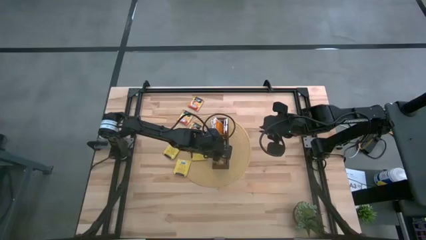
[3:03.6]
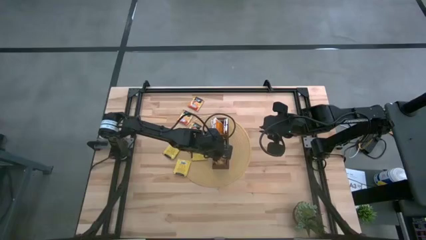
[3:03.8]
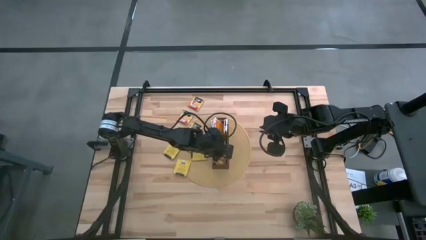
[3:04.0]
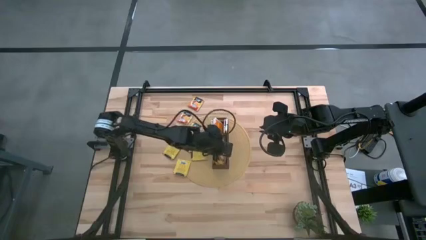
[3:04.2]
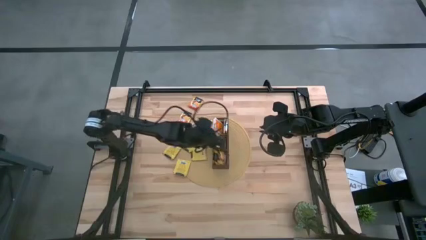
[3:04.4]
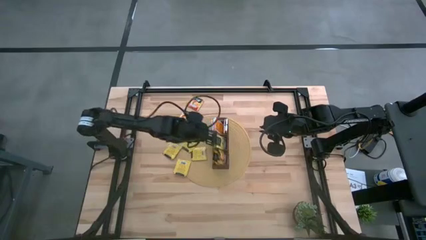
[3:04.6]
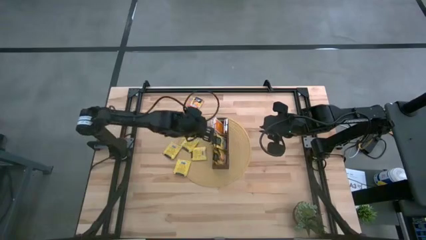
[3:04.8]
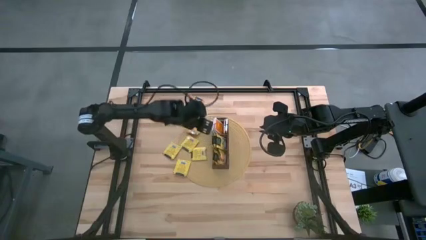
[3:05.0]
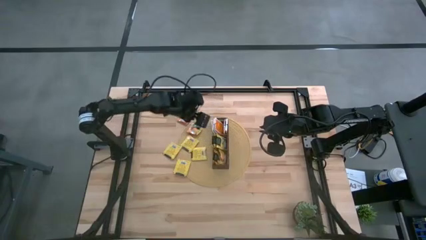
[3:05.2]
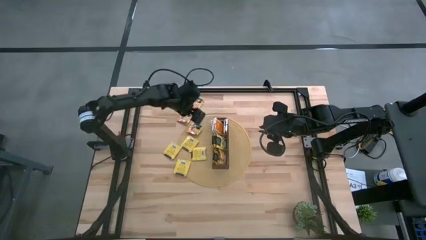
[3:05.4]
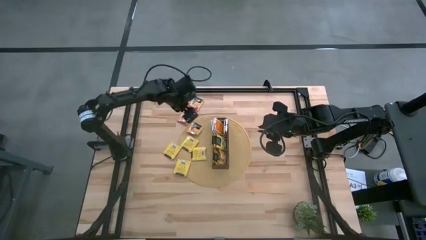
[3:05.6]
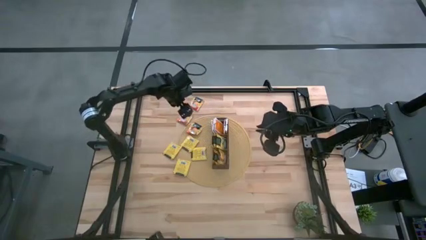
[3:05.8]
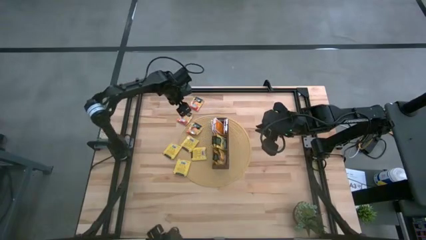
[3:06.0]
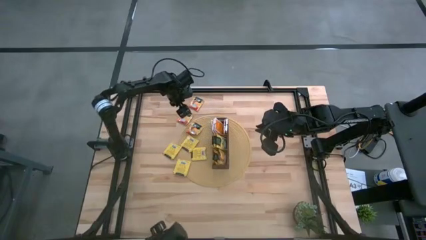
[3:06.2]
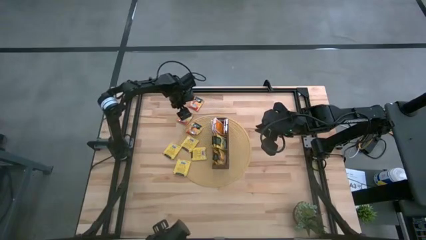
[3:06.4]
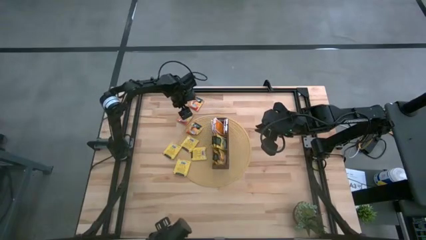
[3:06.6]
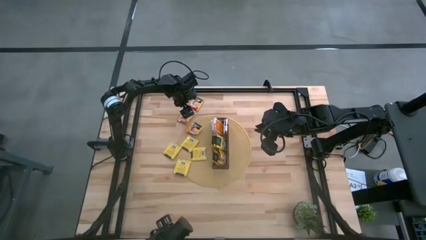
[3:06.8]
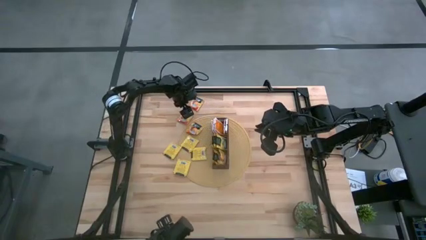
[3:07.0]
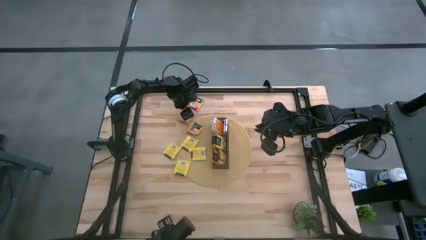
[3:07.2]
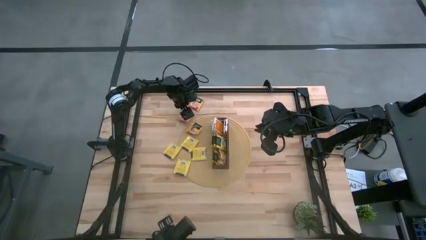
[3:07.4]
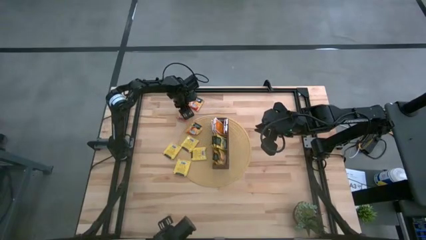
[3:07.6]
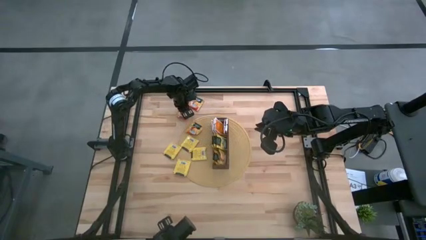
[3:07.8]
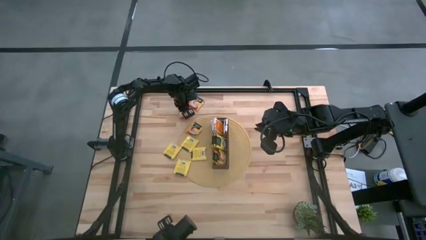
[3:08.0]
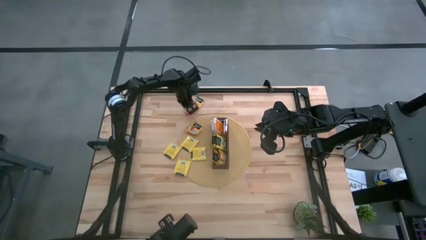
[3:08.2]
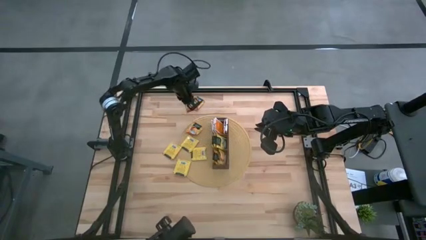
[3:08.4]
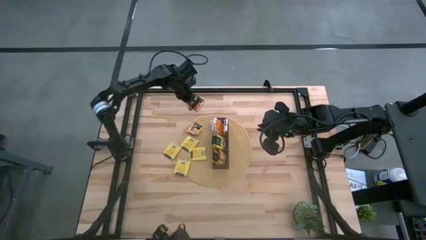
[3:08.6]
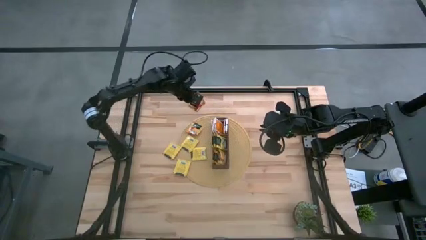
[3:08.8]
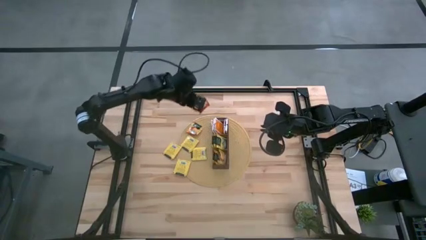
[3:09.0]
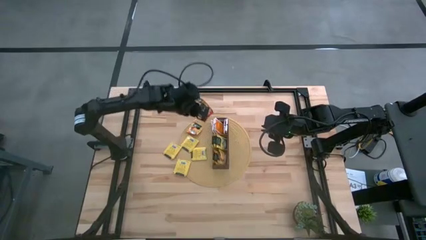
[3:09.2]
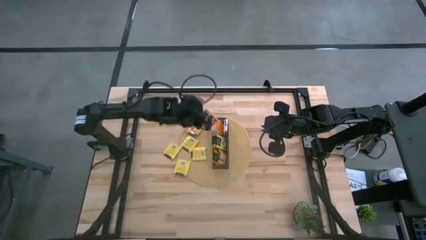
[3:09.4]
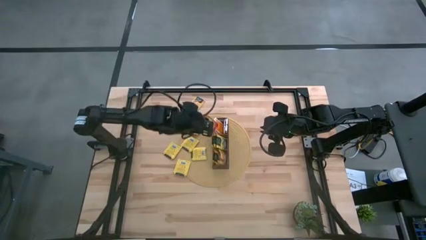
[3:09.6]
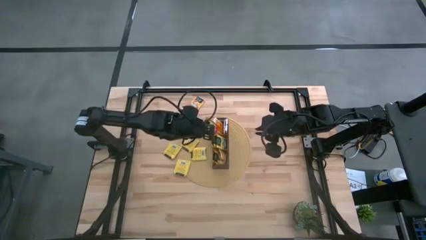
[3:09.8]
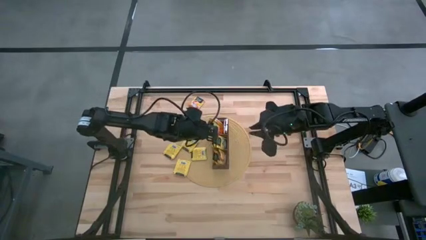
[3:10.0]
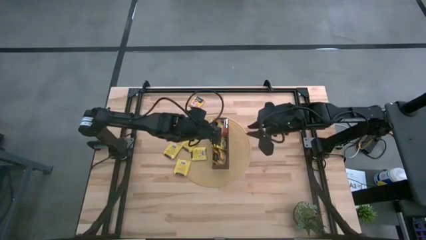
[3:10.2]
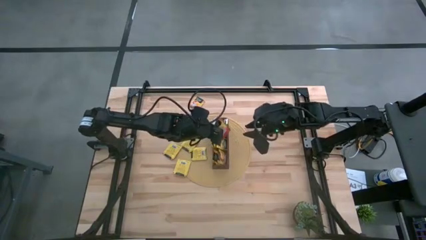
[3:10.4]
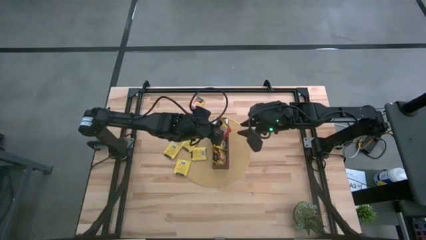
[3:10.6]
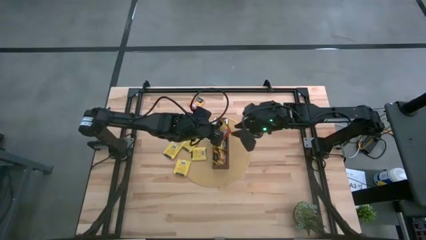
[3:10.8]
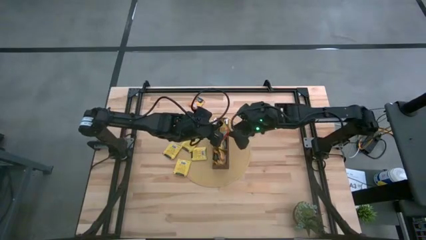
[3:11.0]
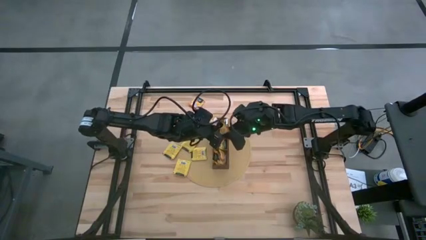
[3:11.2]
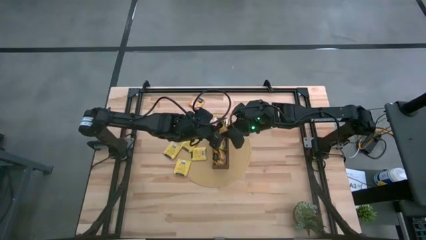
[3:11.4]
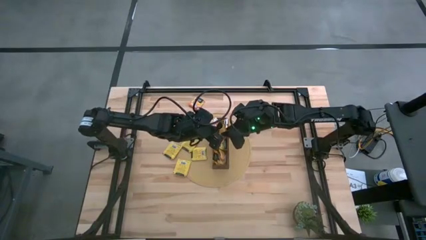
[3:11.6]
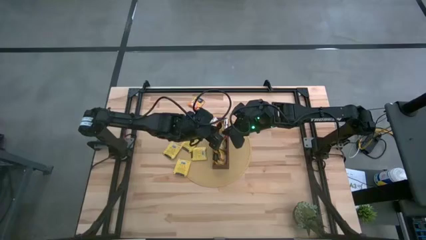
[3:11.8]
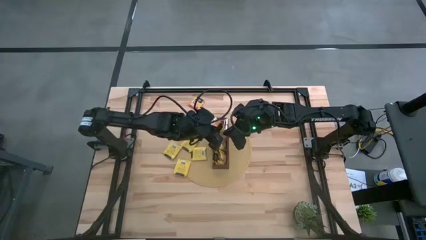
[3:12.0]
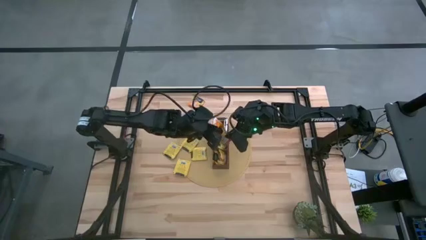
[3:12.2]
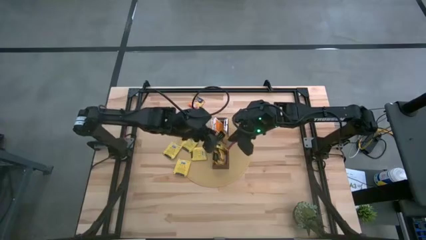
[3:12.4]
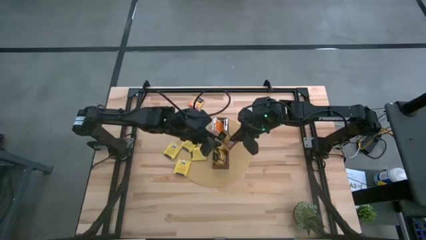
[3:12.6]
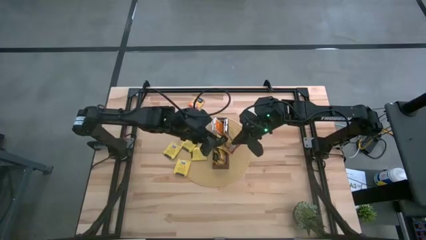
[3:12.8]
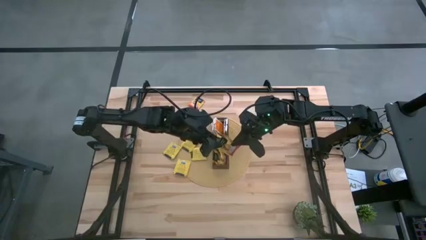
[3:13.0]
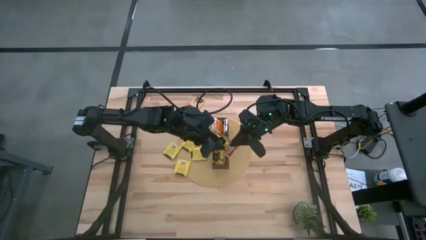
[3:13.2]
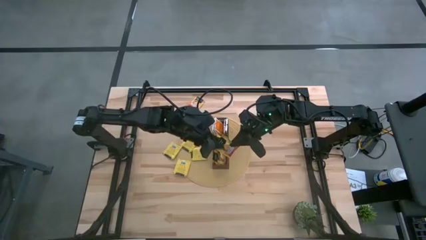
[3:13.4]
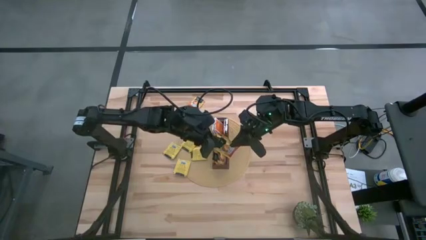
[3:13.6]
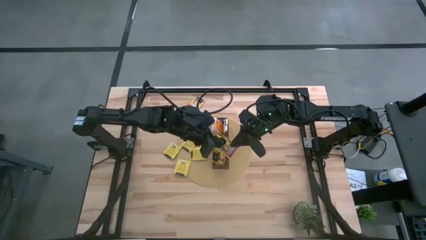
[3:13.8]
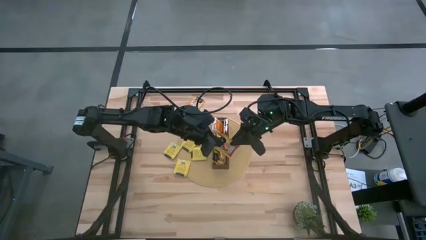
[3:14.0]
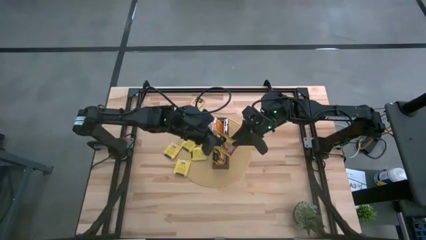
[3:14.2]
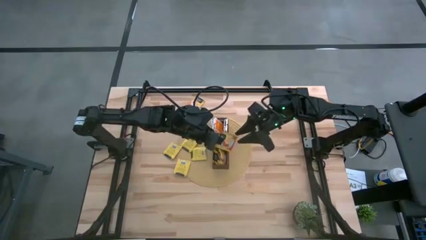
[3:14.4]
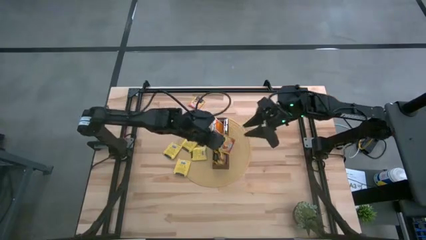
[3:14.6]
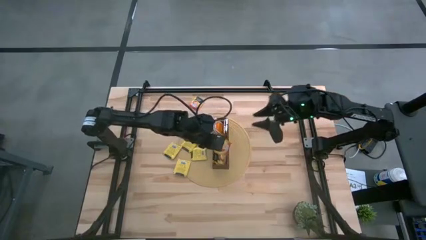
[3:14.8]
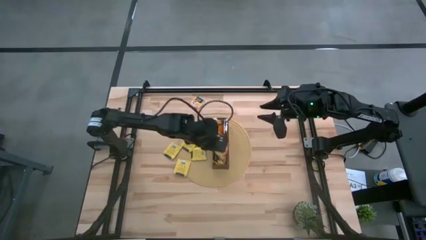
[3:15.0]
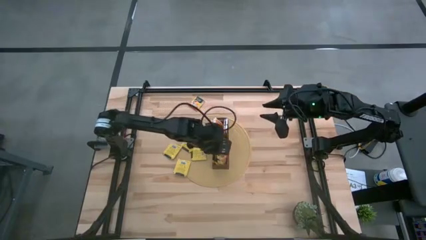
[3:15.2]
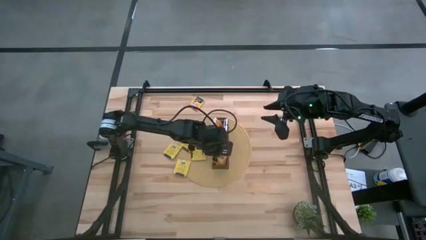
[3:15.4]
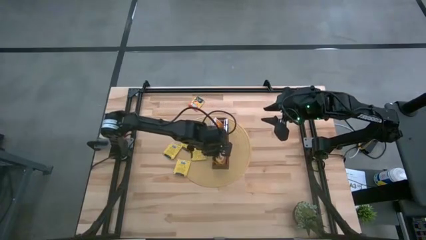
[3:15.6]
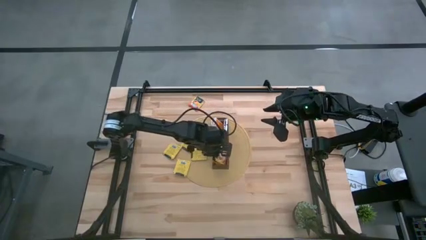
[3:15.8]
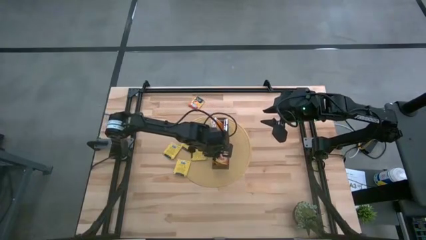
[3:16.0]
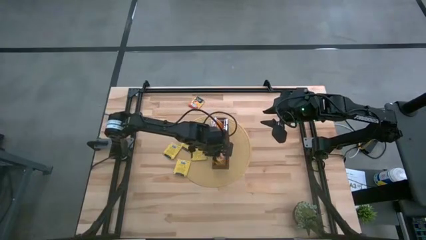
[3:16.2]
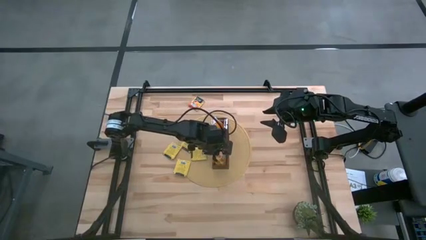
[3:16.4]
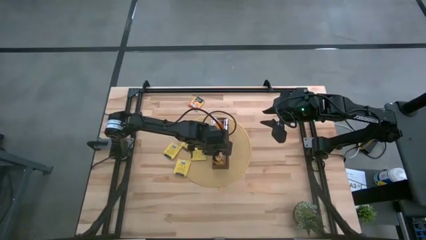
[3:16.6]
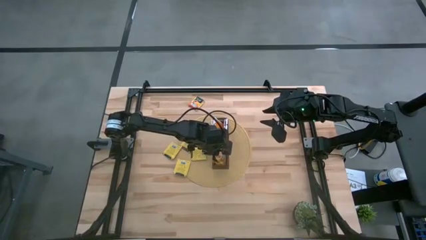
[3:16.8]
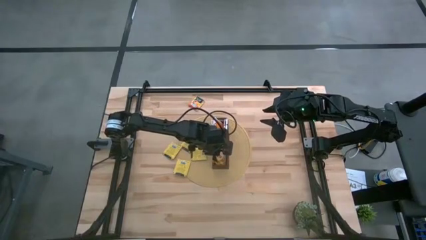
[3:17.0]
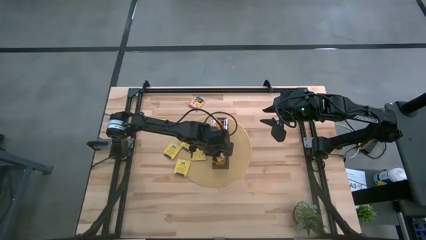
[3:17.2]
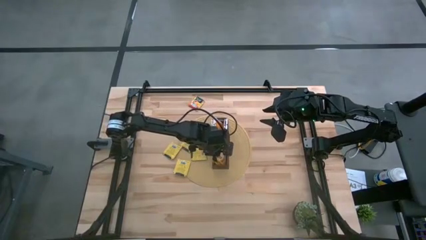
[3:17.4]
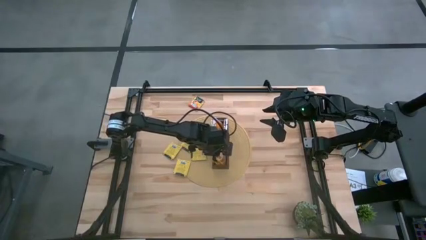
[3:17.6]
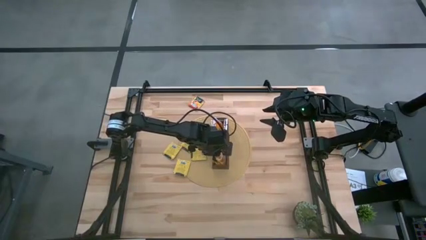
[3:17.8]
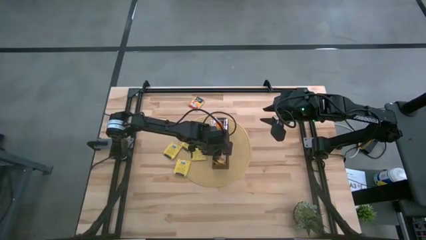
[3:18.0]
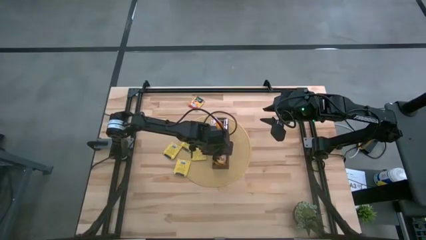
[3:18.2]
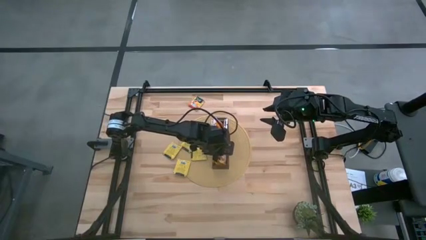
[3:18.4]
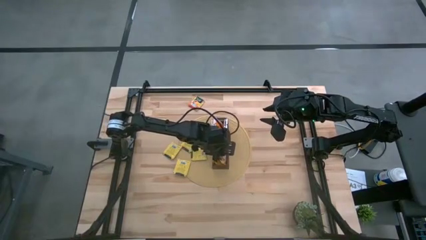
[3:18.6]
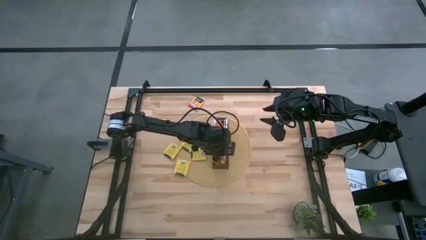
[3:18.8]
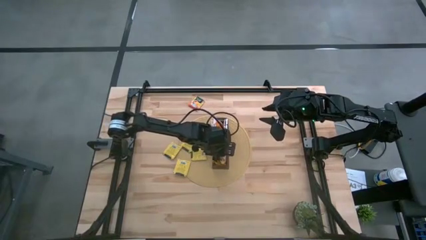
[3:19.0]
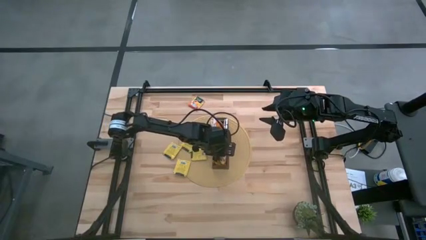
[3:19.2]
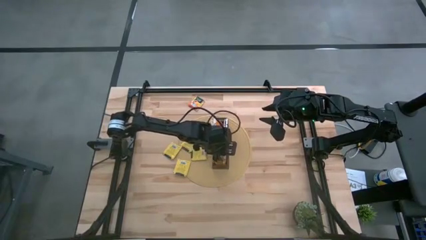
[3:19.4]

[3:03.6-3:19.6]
Task: Pick & Place Tea
Put the middle orange tea bag into the bottom section of the wooden organizer

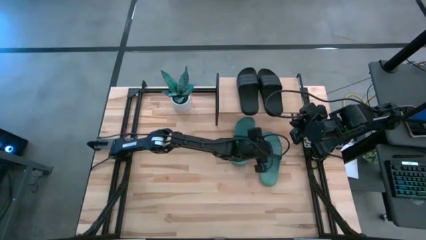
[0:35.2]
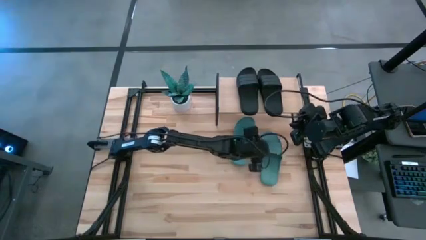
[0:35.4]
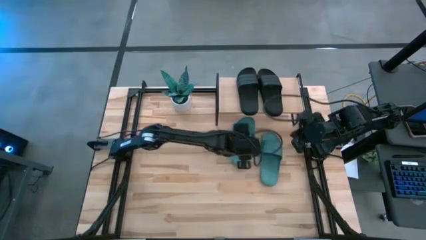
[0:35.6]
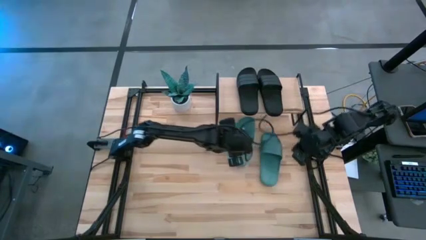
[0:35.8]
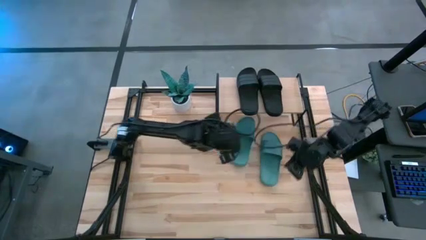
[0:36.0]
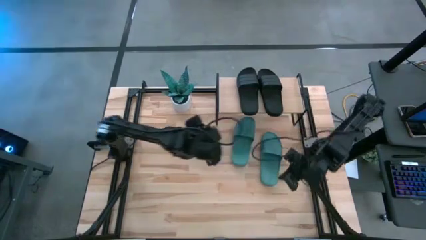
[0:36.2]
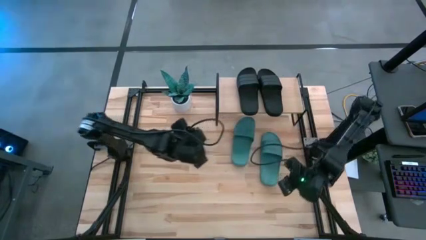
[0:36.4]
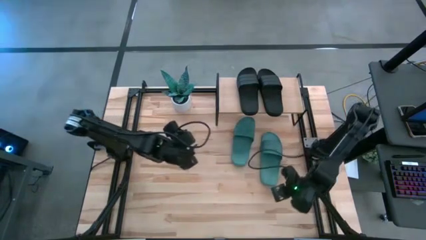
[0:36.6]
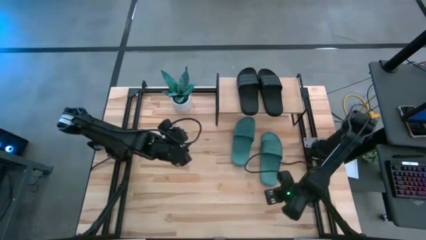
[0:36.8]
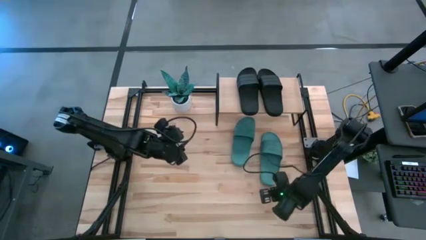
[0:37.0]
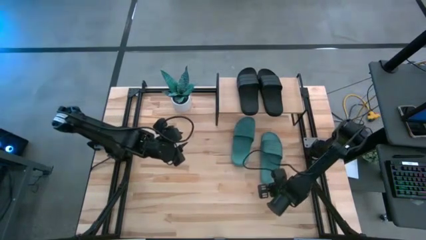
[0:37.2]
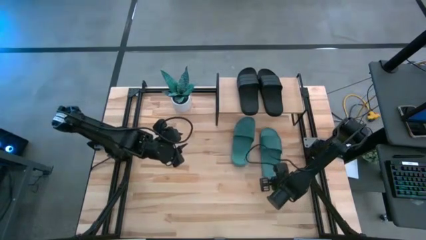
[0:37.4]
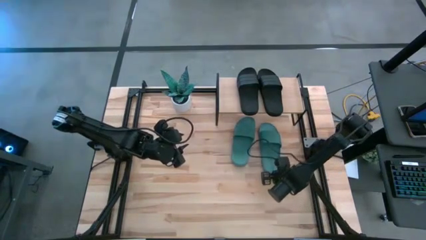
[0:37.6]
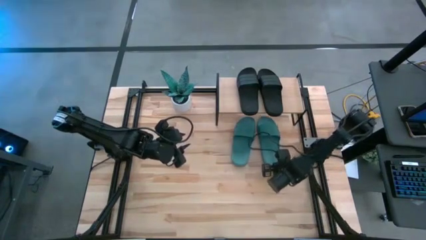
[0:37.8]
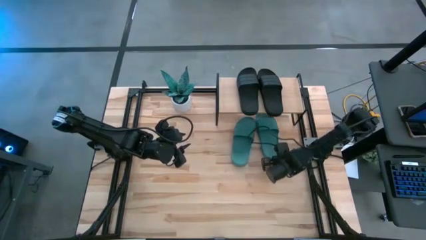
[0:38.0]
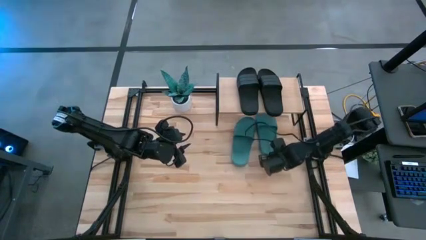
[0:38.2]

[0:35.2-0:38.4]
Task: Pick and place slides into the shelf
Move the right green slipper under the shelf
